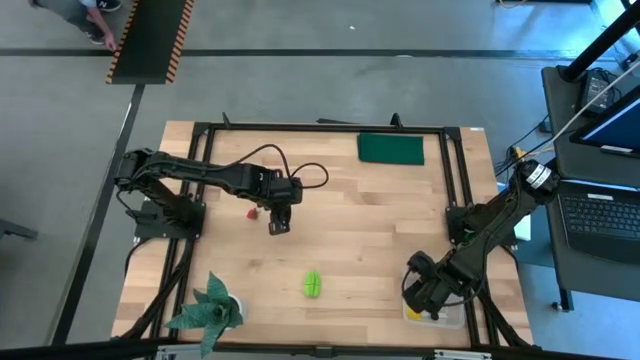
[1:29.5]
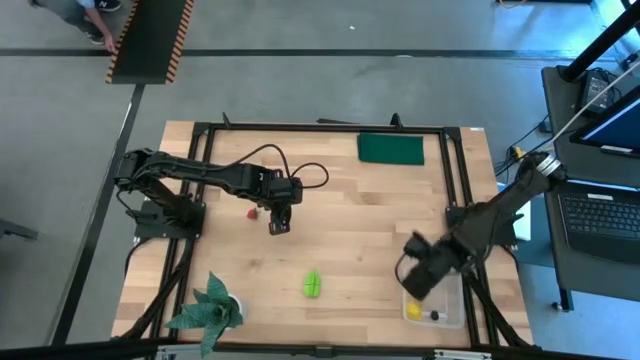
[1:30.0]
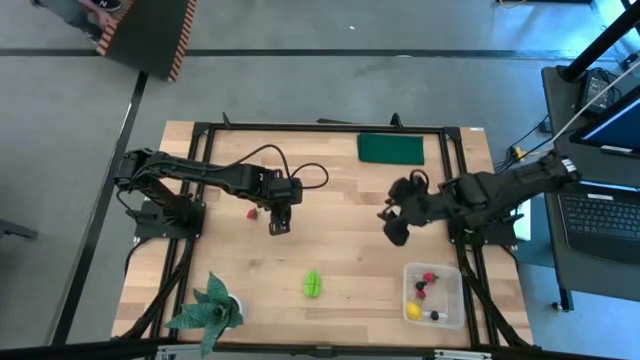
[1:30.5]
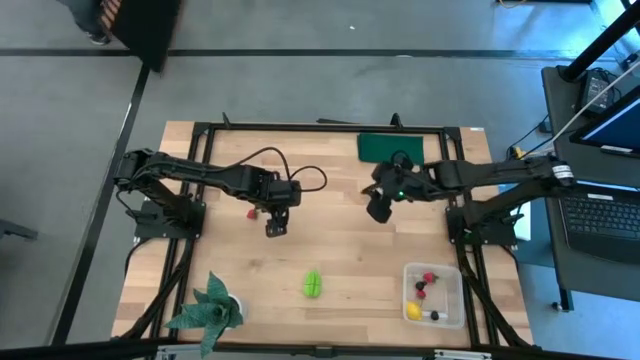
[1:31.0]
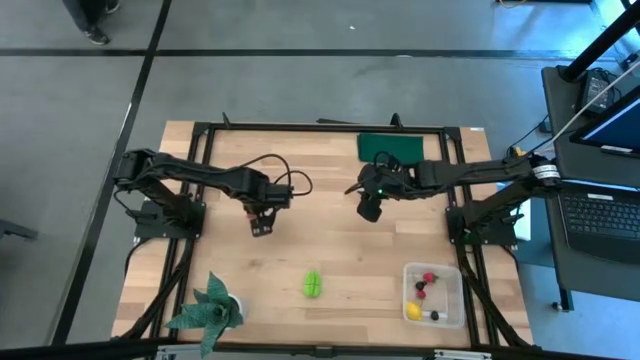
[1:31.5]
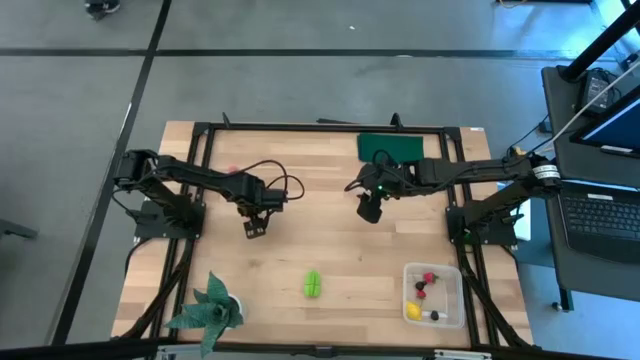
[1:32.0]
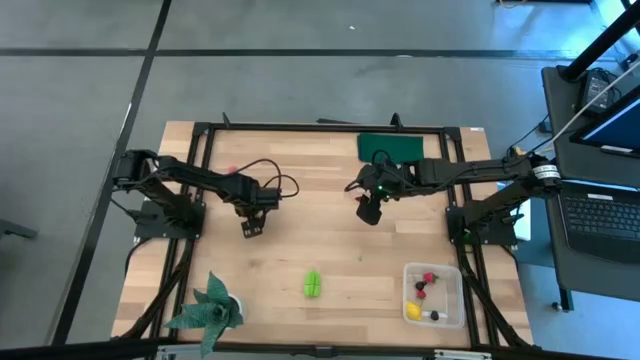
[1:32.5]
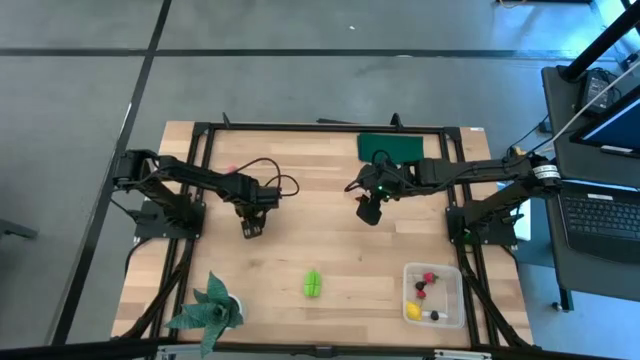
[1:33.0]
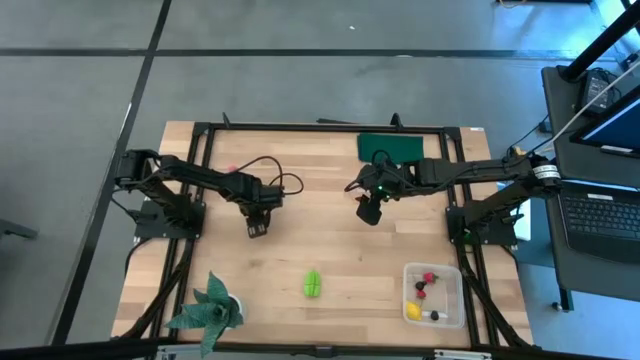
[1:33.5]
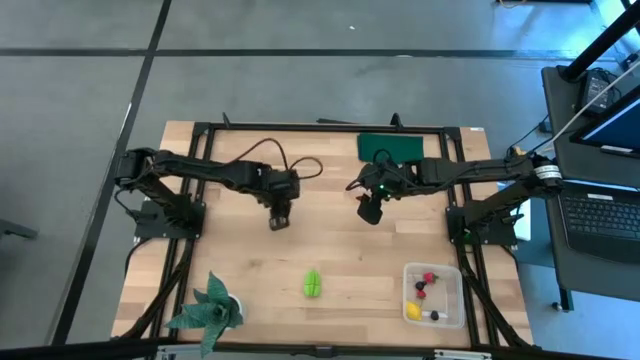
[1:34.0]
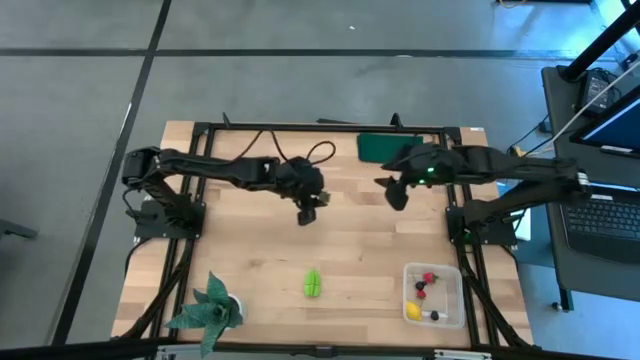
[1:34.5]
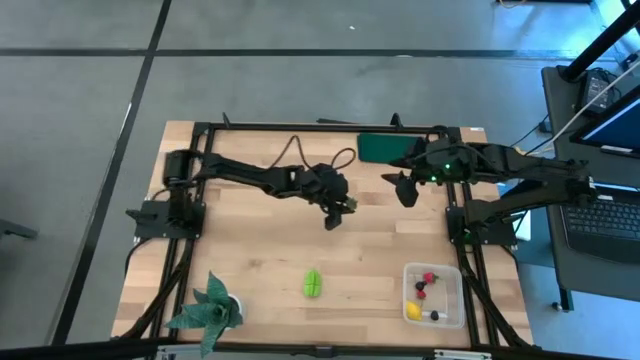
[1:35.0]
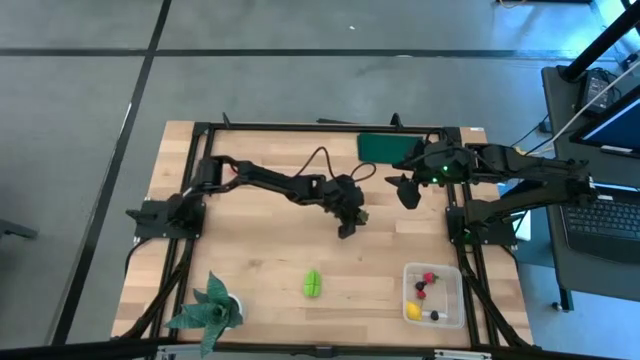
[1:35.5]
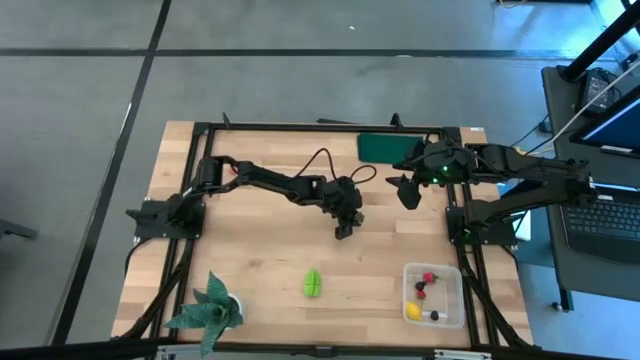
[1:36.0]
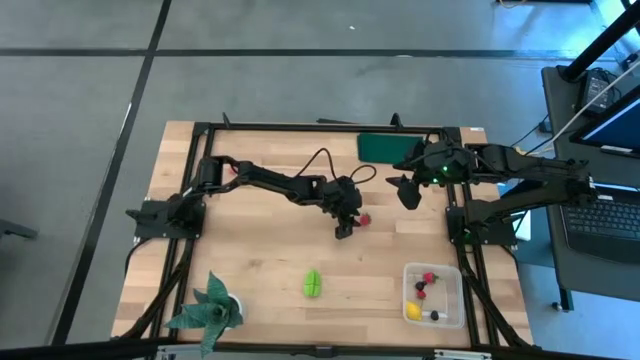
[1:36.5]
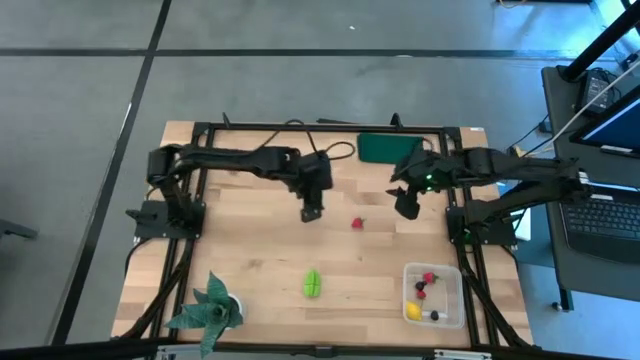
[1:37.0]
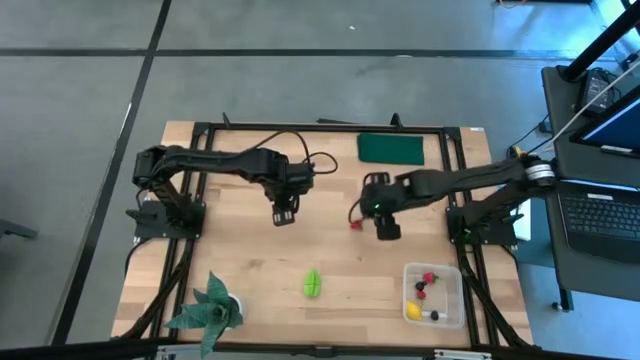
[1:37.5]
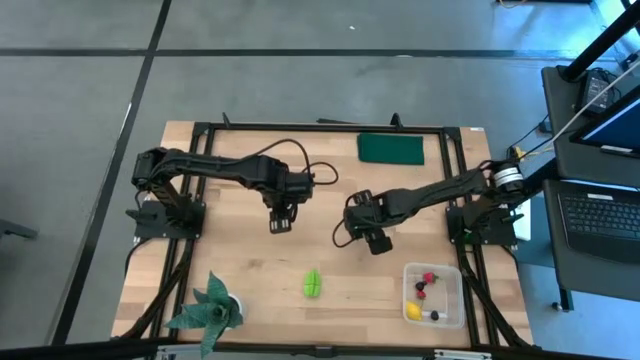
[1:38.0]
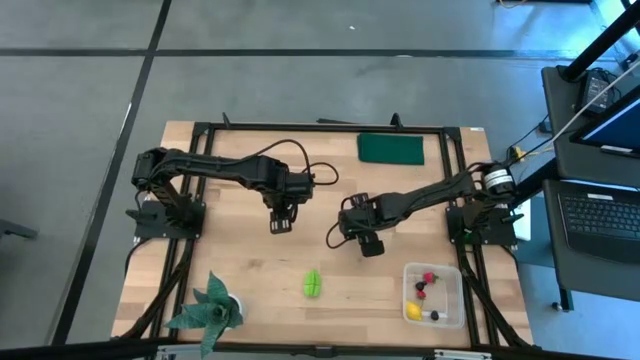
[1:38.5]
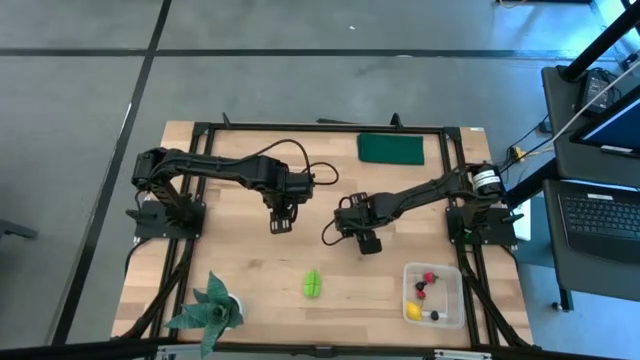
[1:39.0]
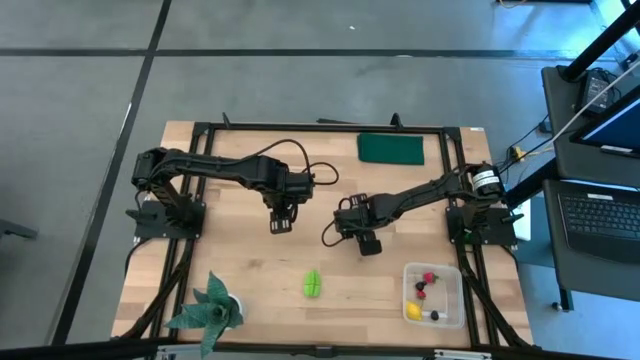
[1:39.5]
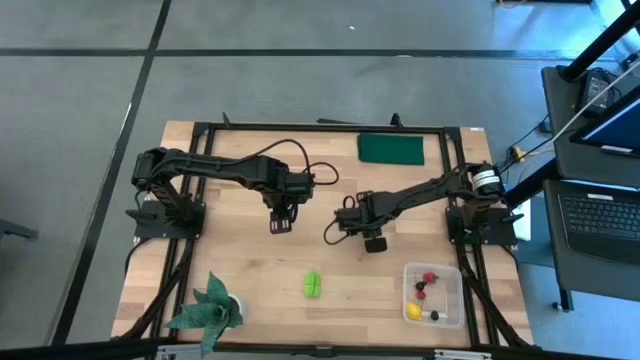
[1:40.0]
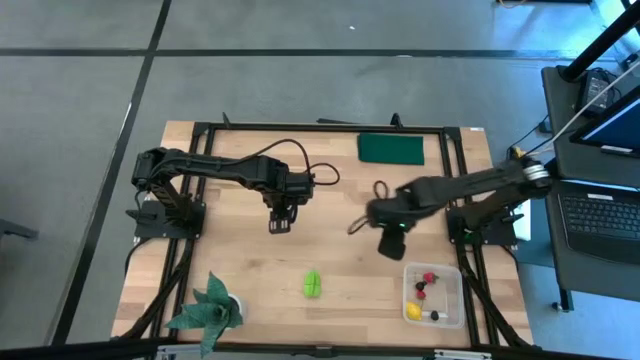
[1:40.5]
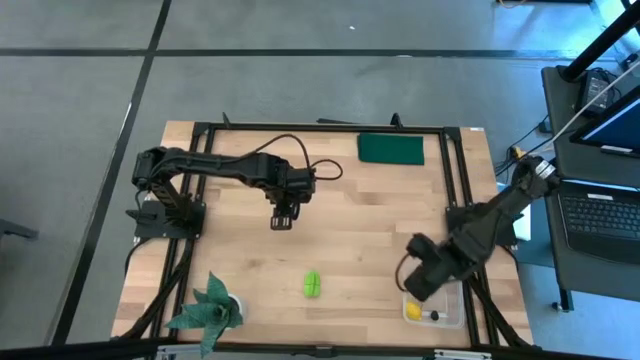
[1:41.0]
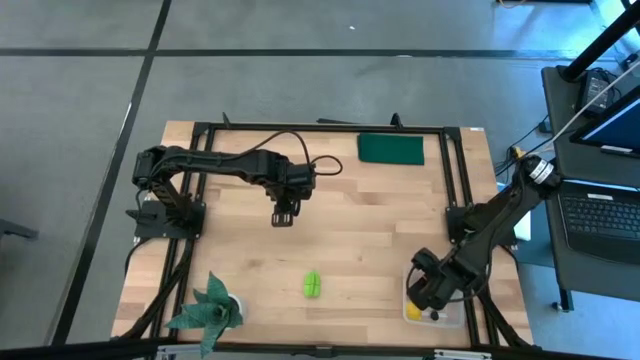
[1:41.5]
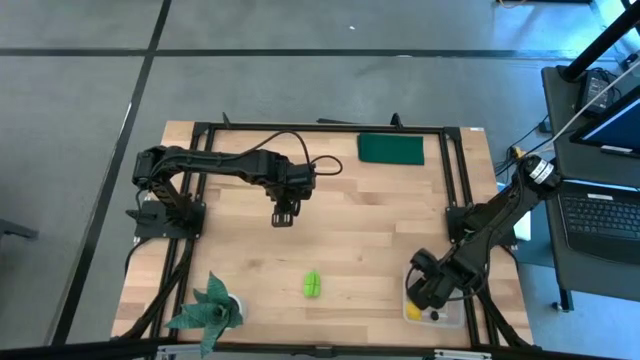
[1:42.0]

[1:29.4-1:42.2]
Task: Pick and placing Produce into tupperware
Put the red strawberry into the transparent bin

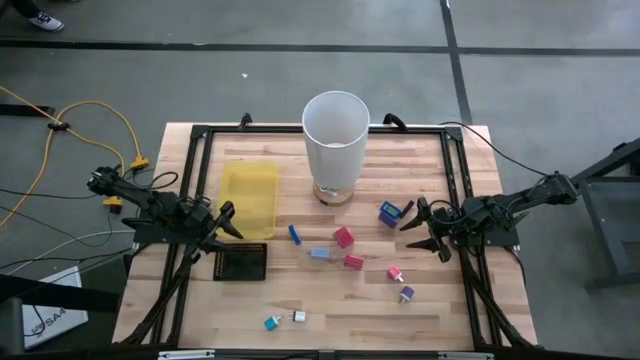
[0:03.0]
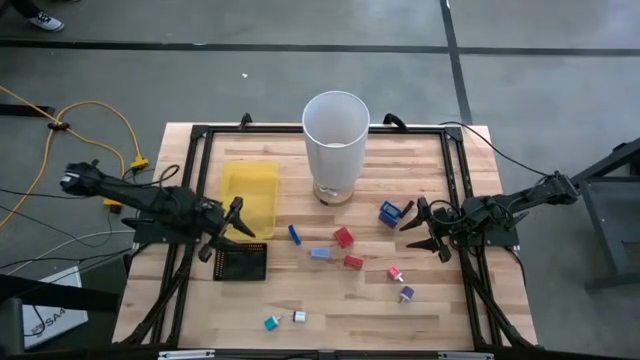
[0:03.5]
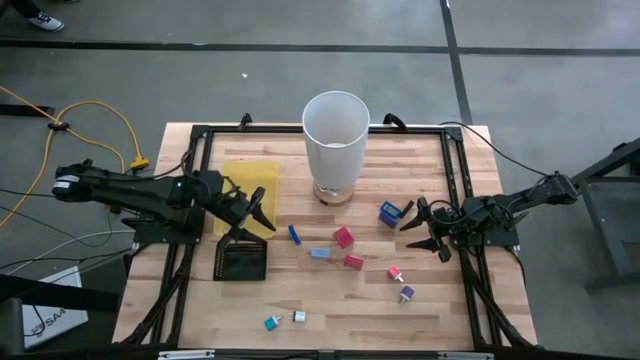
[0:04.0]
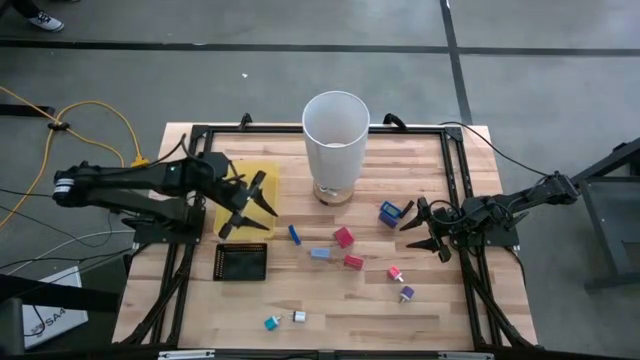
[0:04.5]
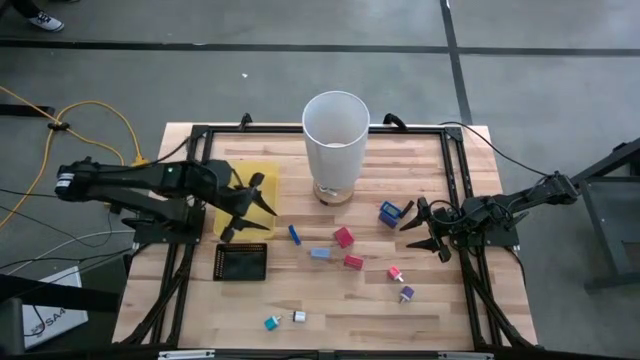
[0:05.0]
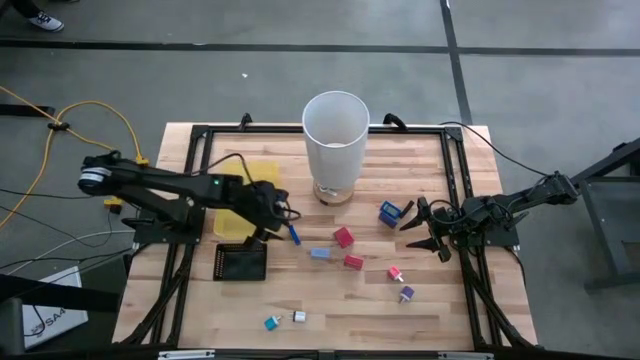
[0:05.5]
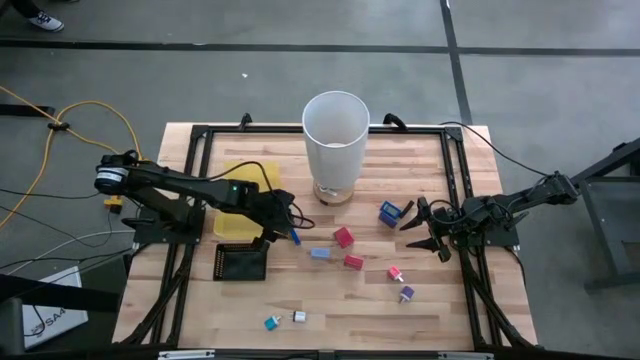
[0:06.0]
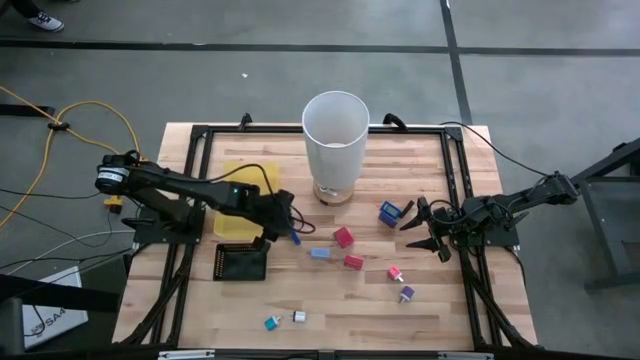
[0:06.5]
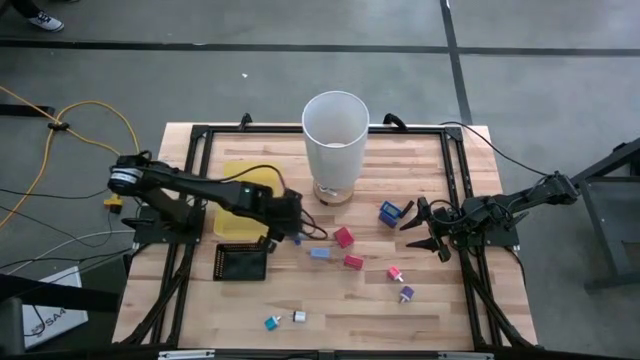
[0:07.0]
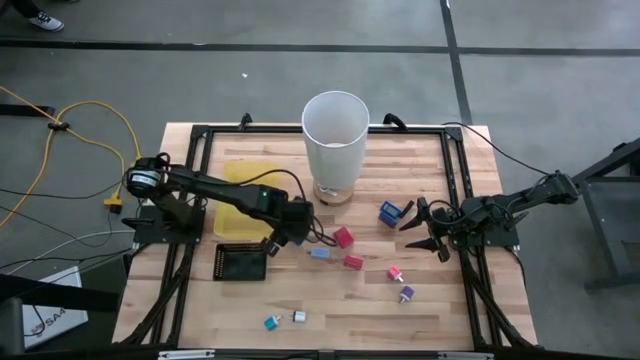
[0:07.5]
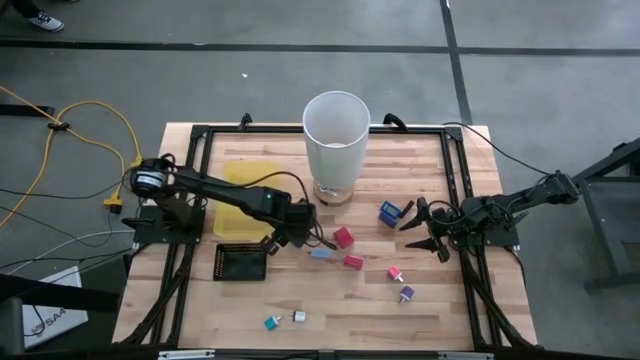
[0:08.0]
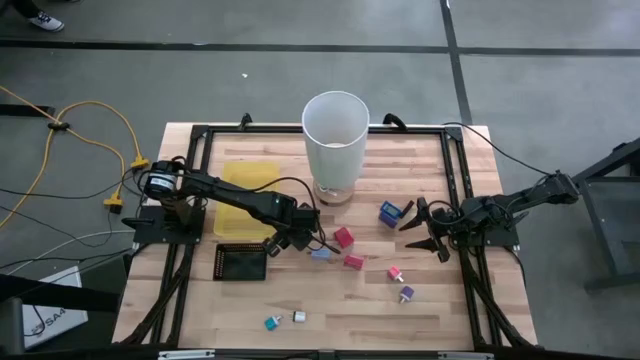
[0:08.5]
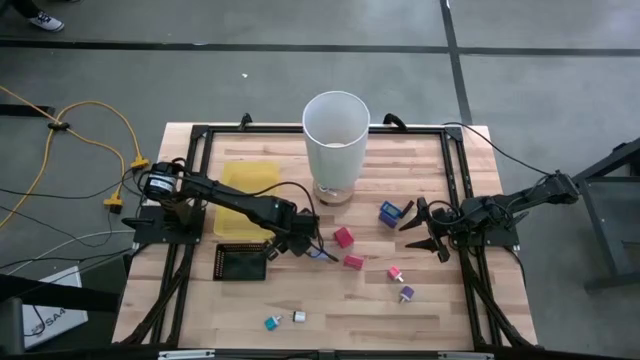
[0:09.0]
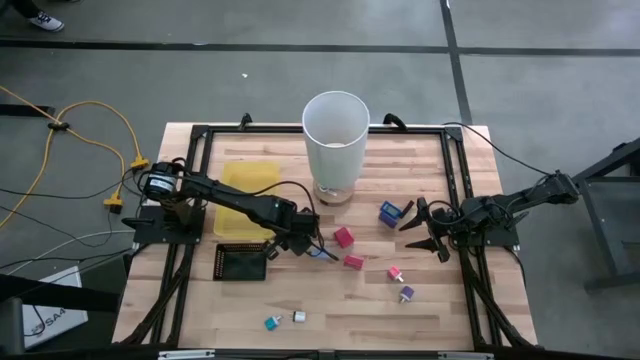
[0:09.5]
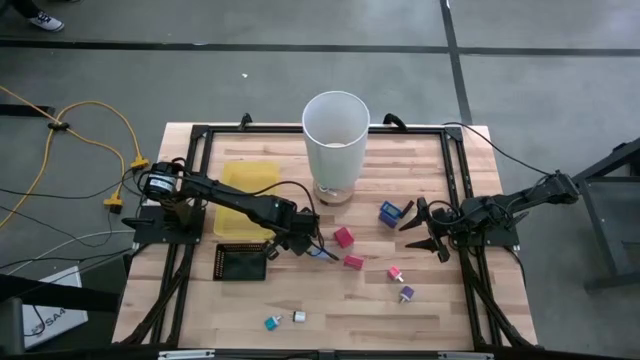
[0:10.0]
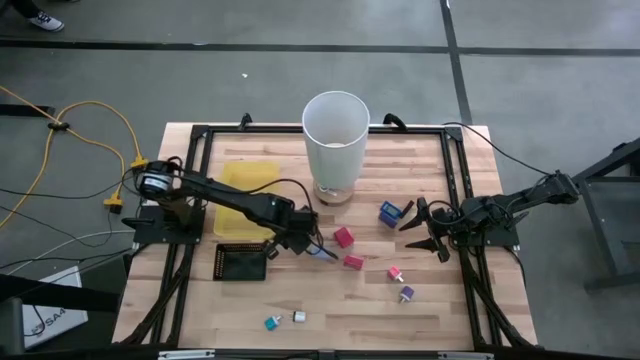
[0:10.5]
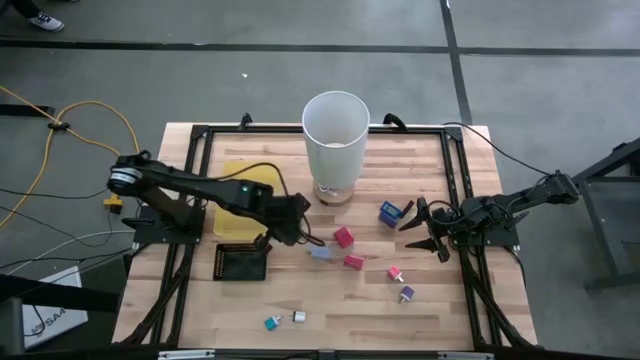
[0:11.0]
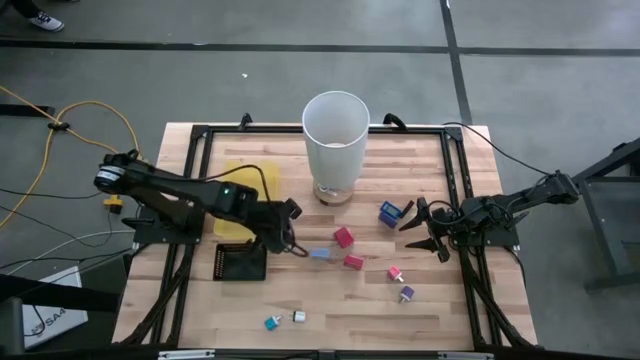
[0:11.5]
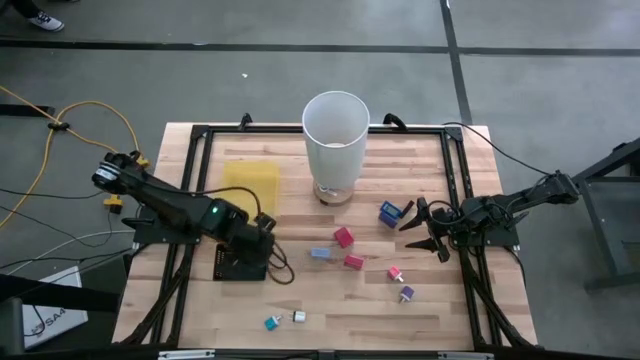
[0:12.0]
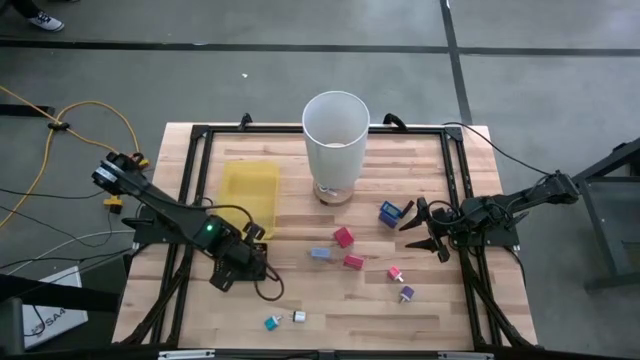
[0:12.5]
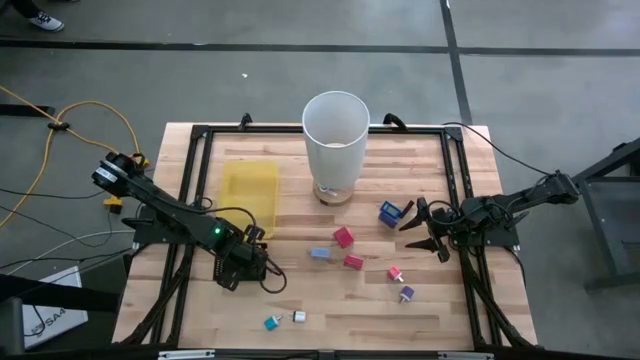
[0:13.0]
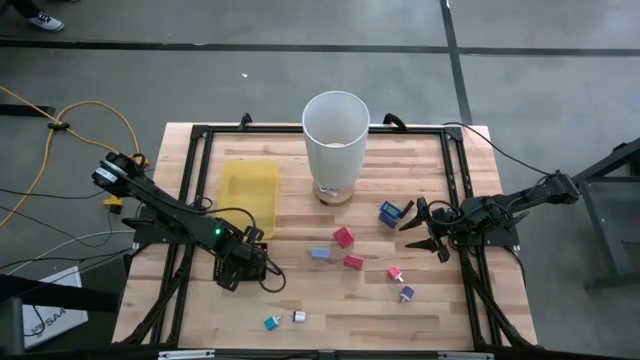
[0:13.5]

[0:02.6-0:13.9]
Task: Pick & Place Office items
Put the left blue digital clock into the black bin
